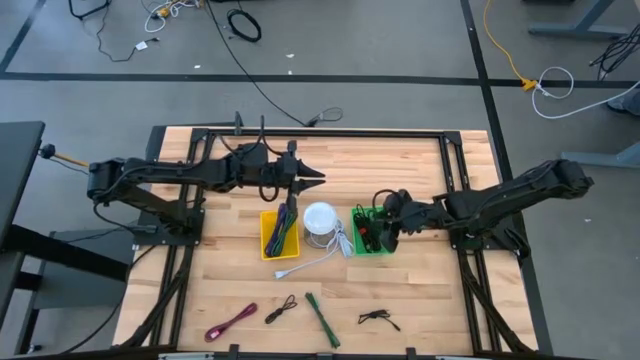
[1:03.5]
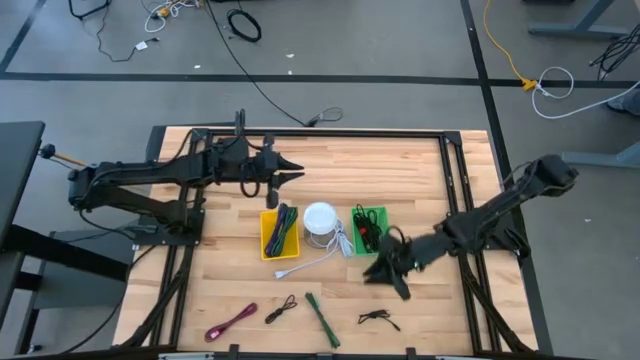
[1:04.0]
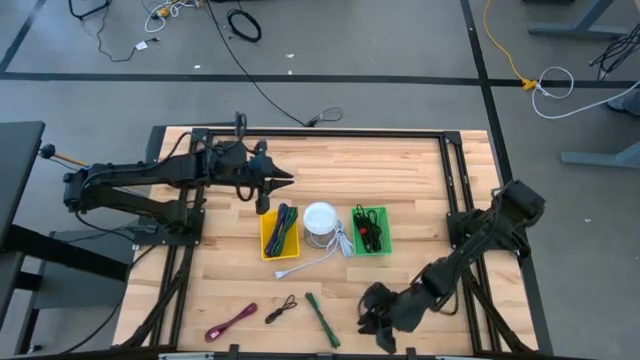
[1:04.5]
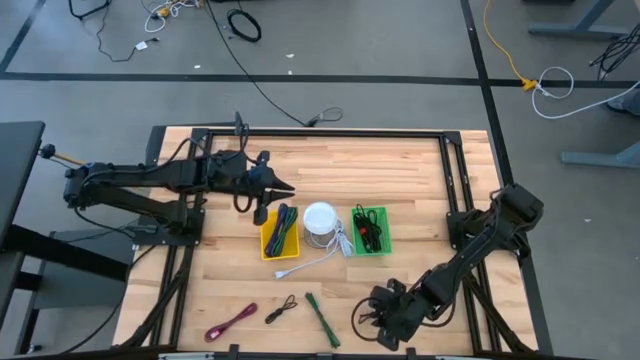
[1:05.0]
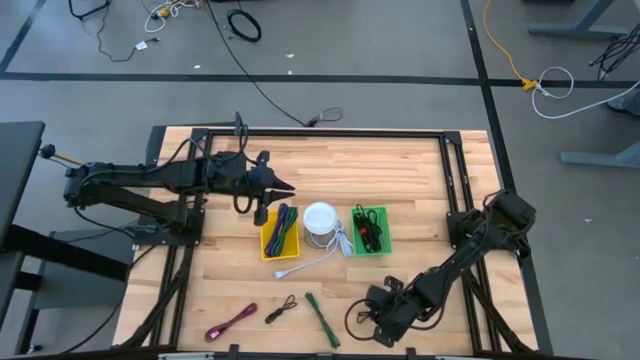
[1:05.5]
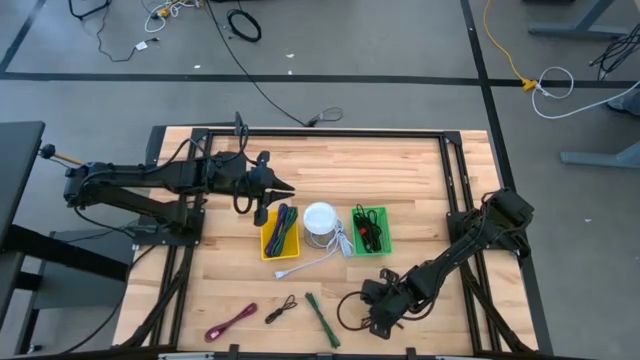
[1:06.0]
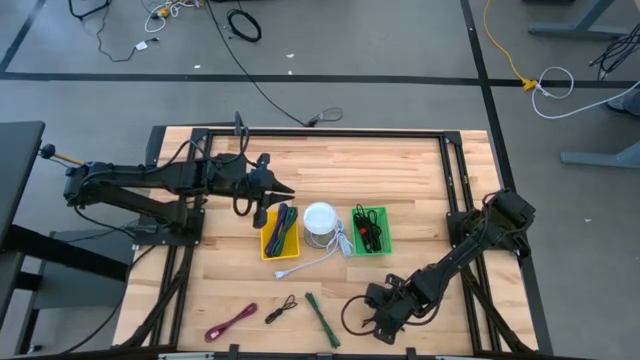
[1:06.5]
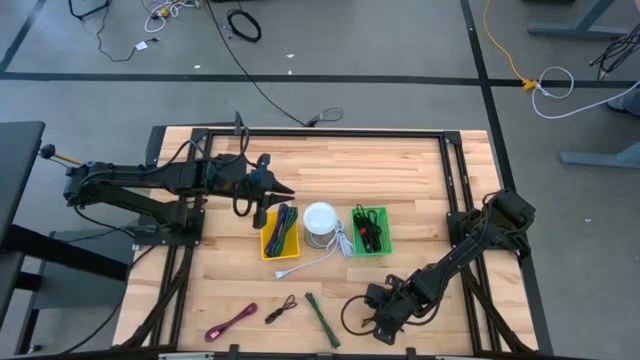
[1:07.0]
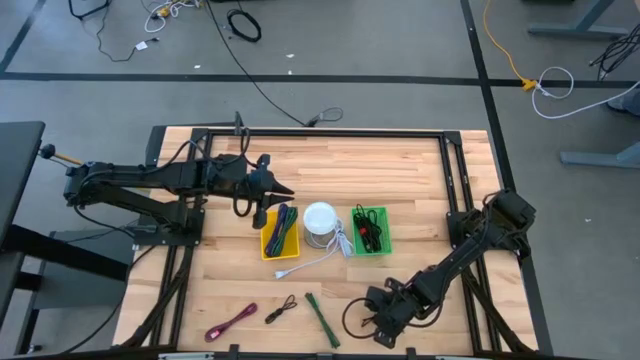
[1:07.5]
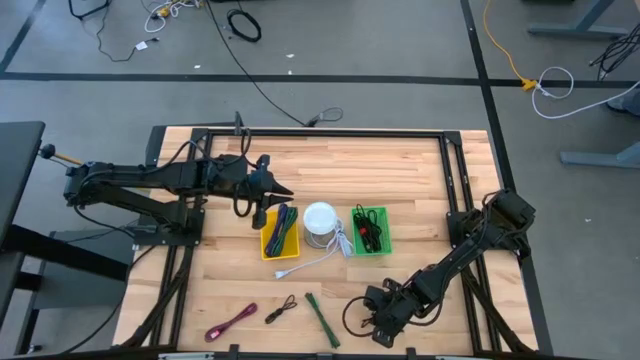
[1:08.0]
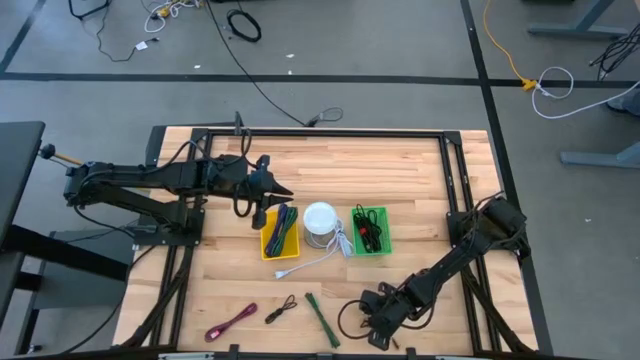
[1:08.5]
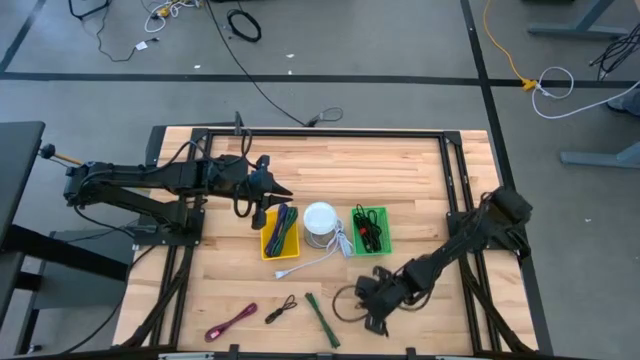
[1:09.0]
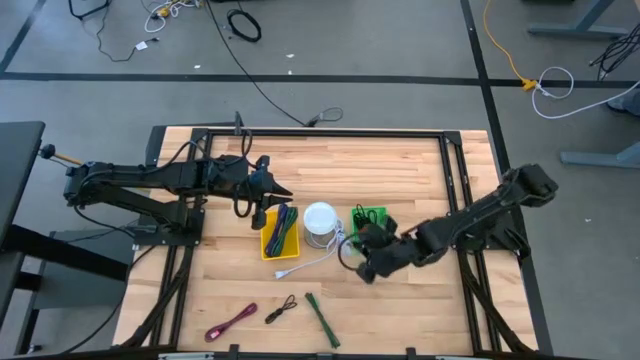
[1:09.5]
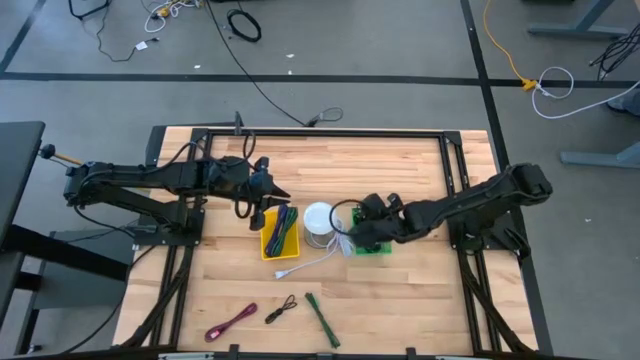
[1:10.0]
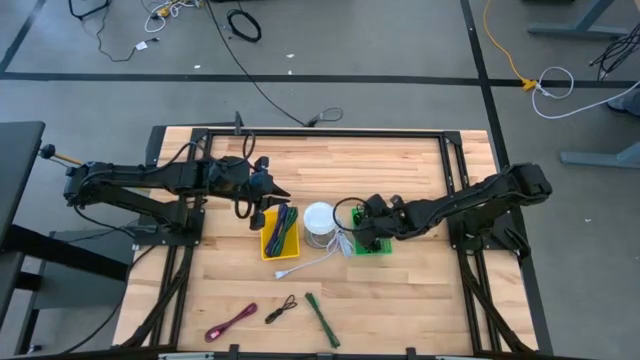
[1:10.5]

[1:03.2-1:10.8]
Task: Pick & Place USB Port
Put the black charger cable into the green basket

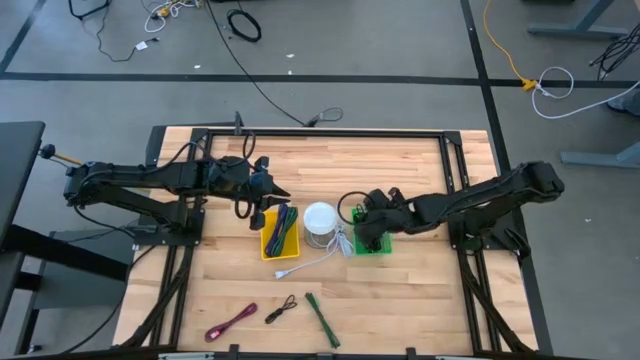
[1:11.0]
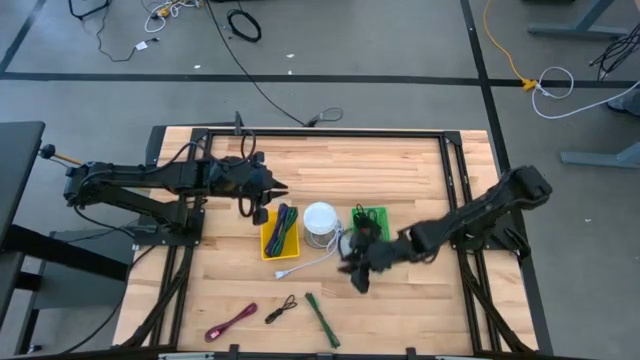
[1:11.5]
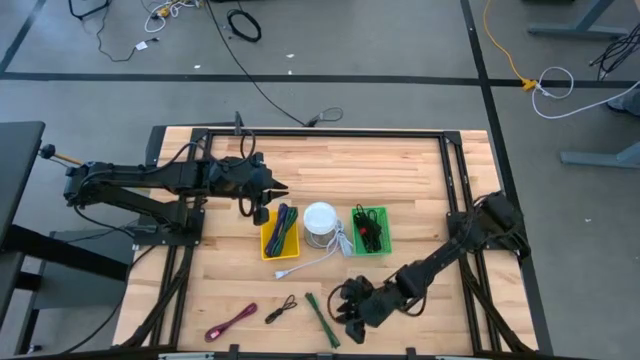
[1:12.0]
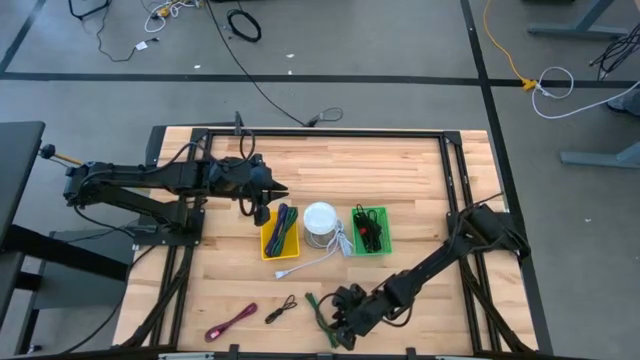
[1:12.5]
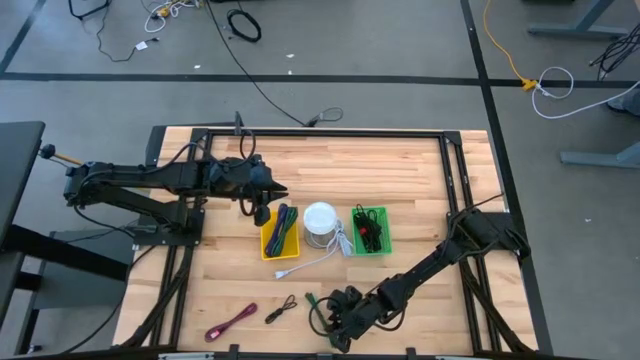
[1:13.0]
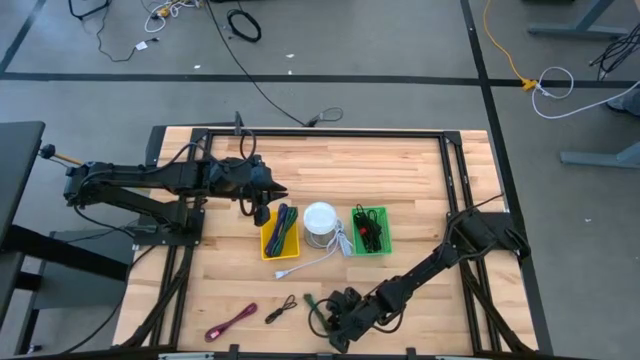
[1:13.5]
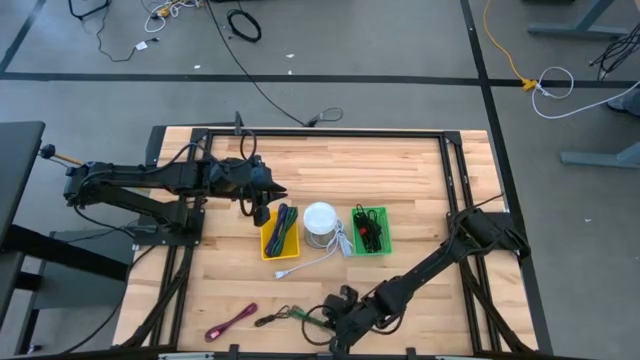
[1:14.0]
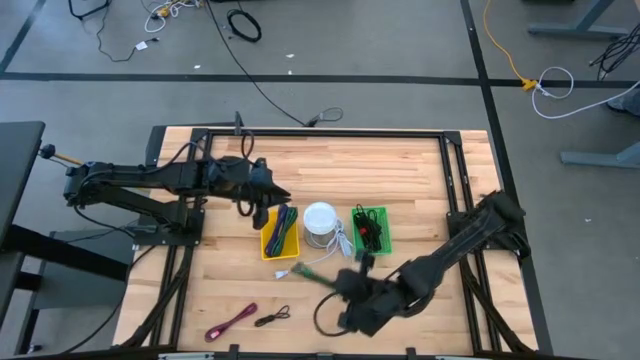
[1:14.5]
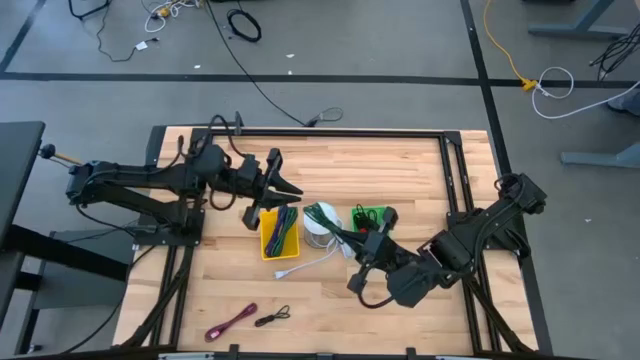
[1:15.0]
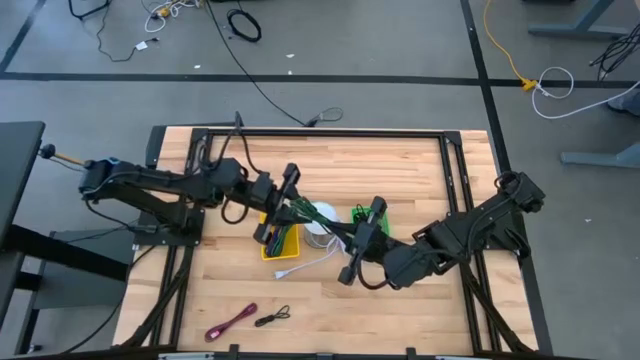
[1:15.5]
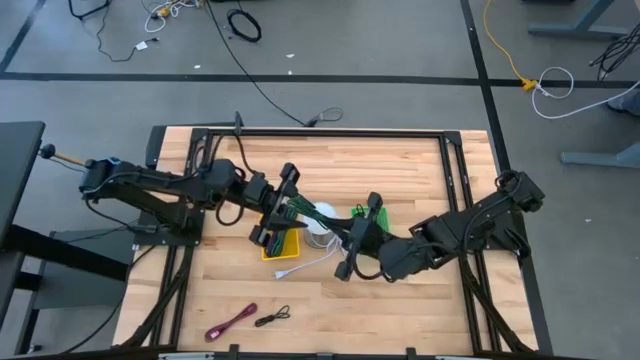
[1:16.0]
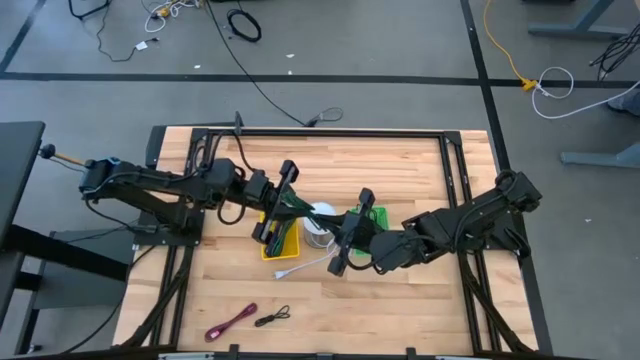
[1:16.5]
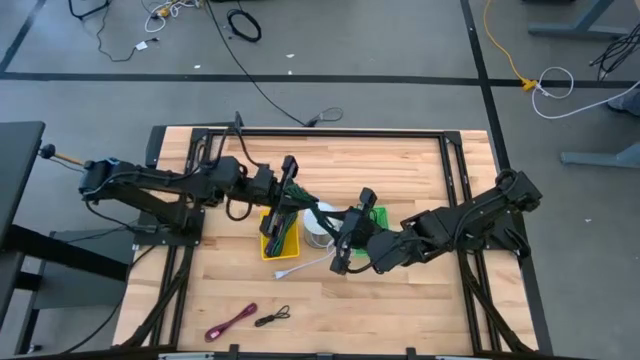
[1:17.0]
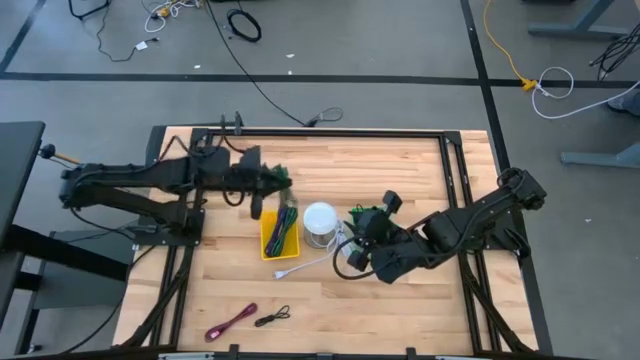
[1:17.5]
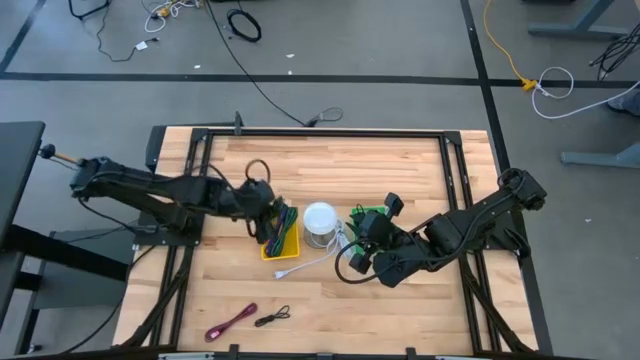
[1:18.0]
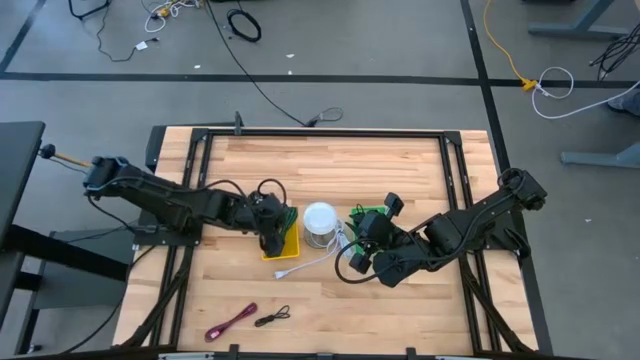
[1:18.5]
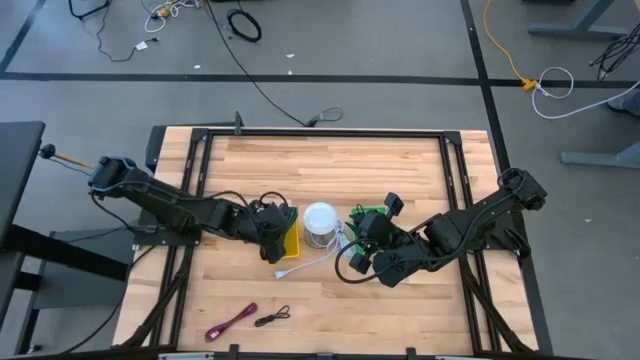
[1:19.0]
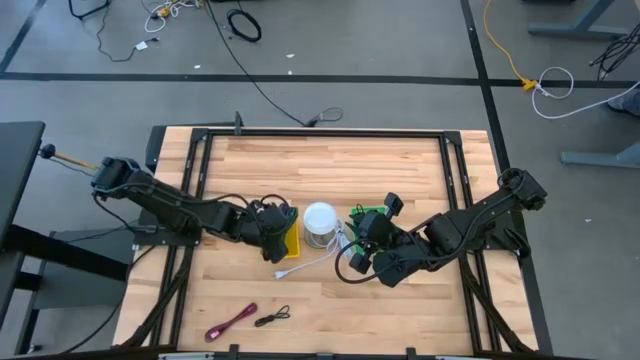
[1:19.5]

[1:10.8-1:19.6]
Put the black green charger cable into the yellow basket

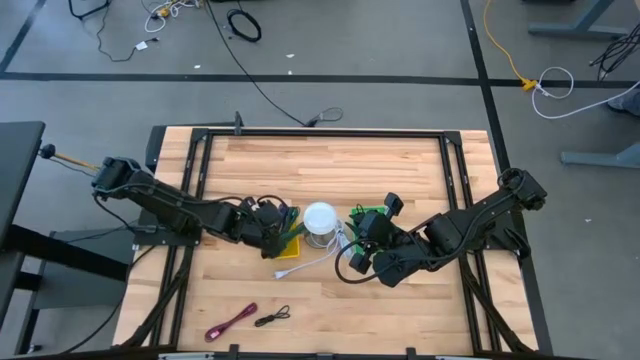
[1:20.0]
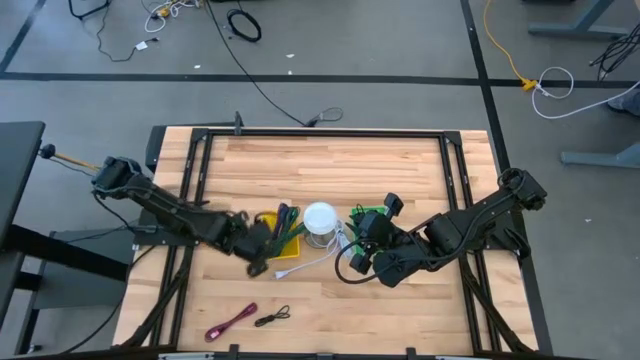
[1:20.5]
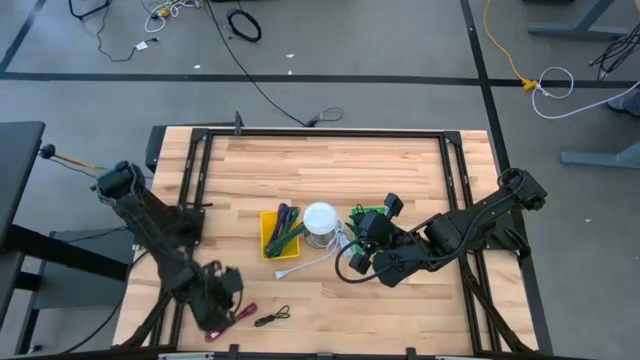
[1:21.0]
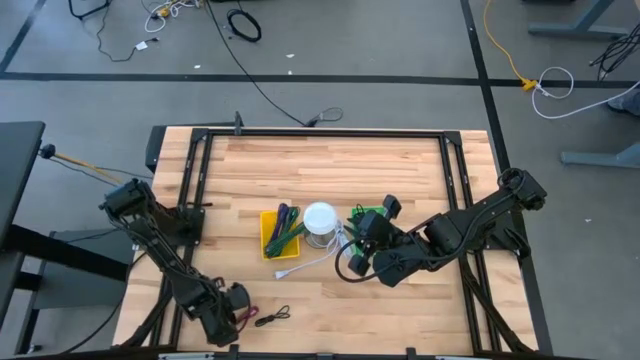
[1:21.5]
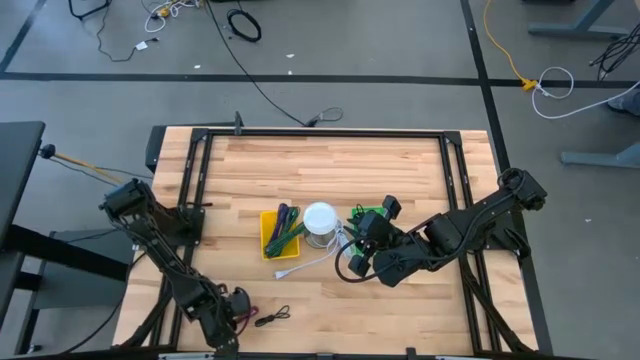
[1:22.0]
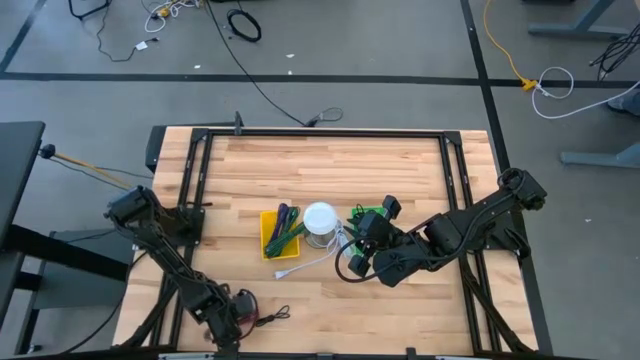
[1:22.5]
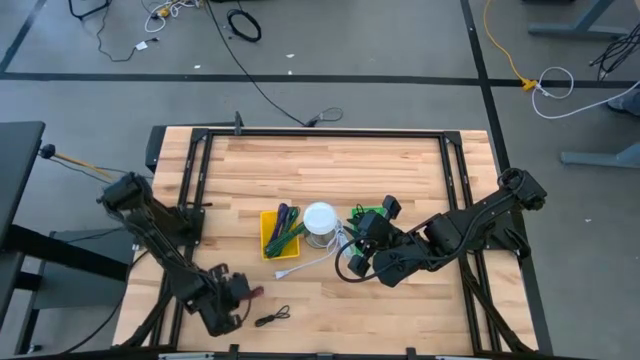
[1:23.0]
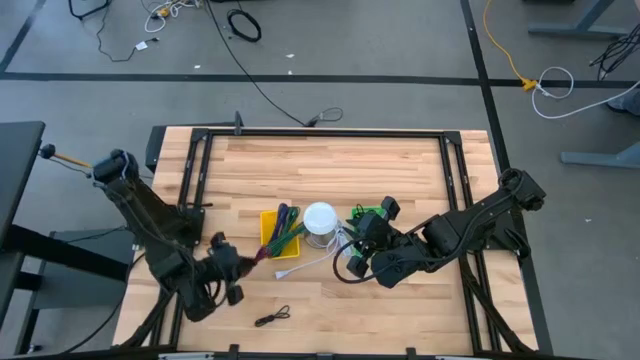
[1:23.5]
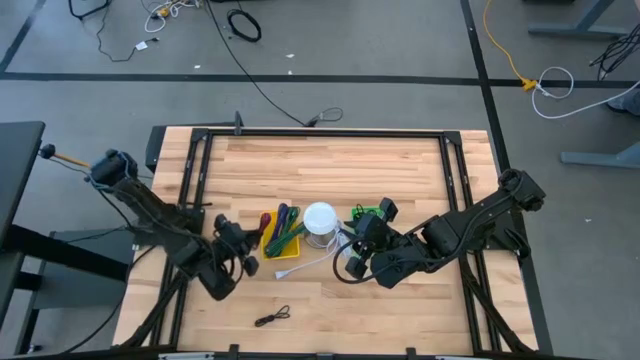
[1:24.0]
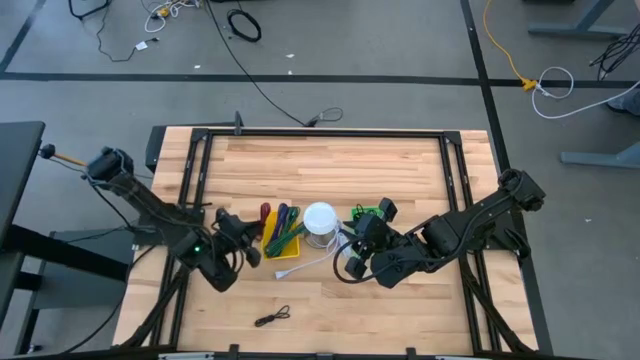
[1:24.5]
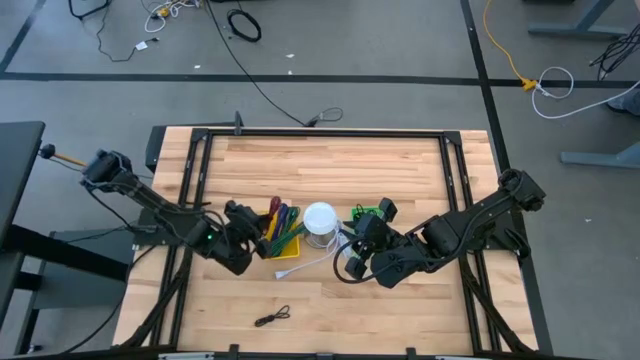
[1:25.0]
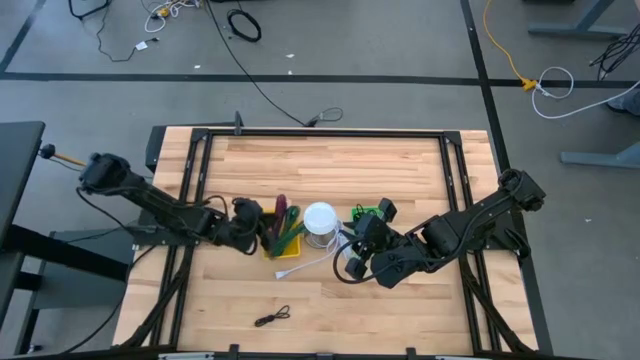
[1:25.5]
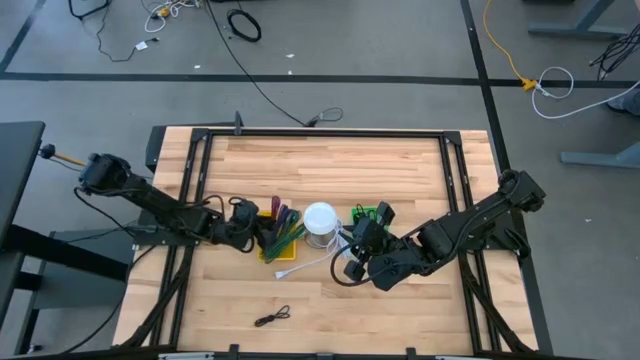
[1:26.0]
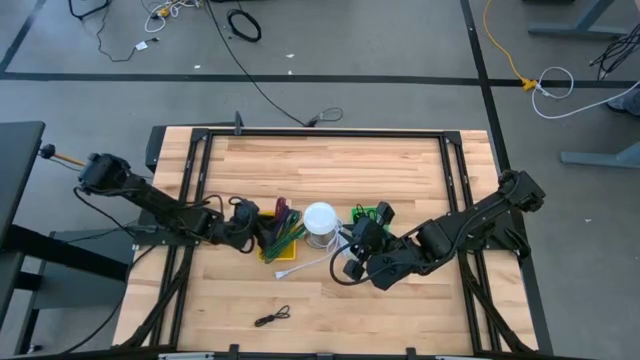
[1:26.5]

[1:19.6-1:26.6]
Put the black red charger cable into the yellow basket
